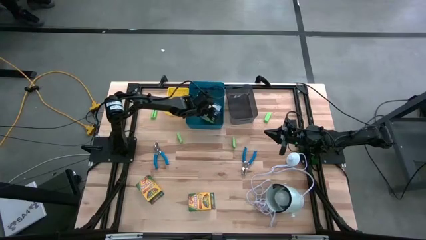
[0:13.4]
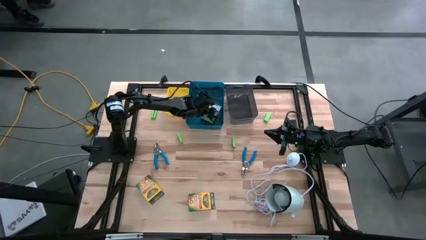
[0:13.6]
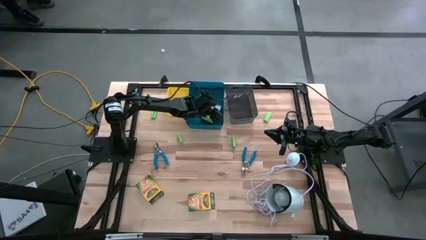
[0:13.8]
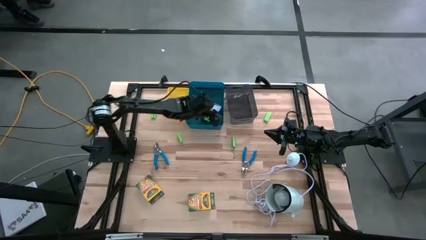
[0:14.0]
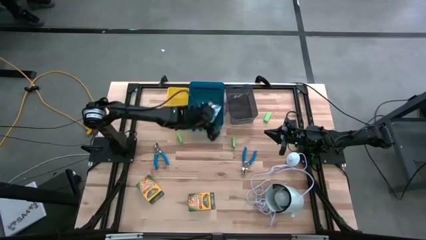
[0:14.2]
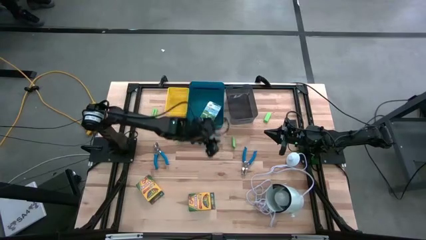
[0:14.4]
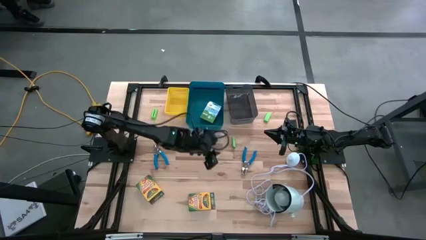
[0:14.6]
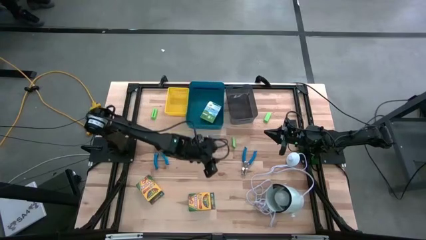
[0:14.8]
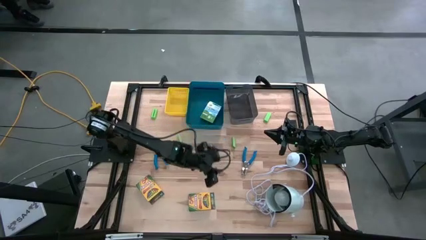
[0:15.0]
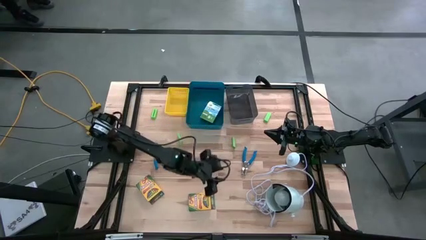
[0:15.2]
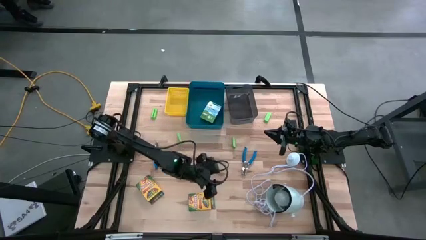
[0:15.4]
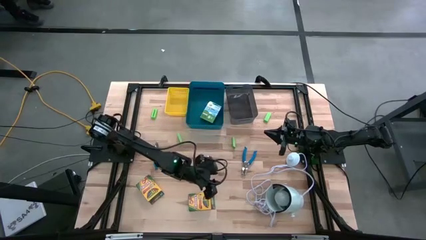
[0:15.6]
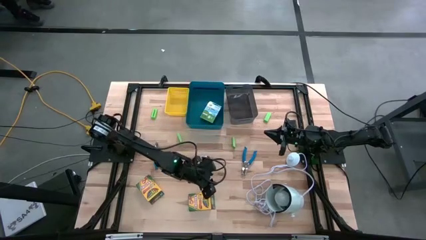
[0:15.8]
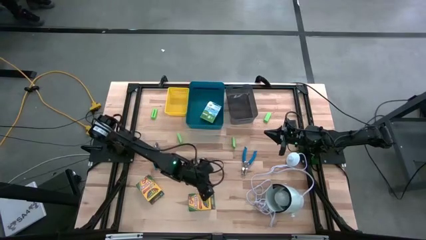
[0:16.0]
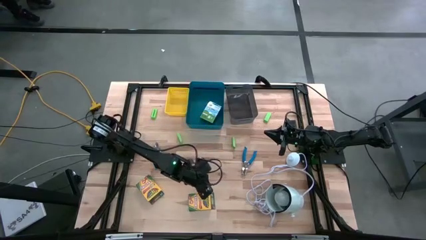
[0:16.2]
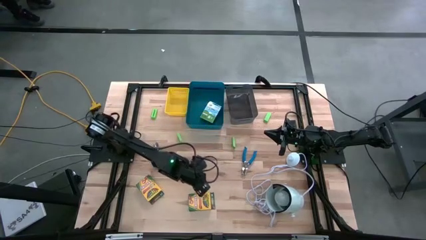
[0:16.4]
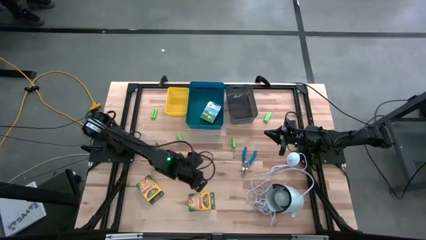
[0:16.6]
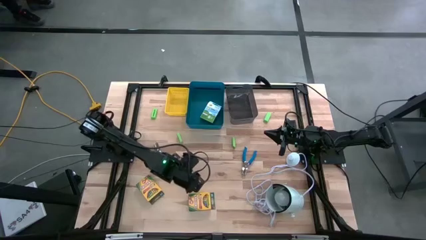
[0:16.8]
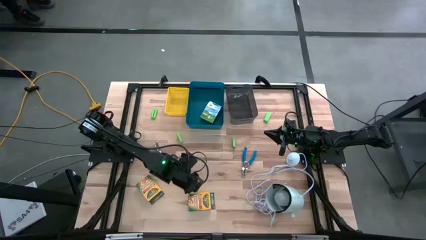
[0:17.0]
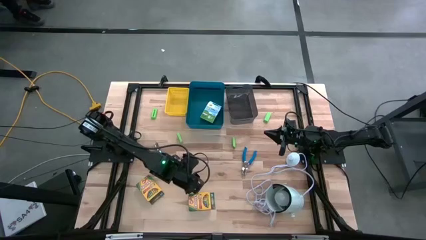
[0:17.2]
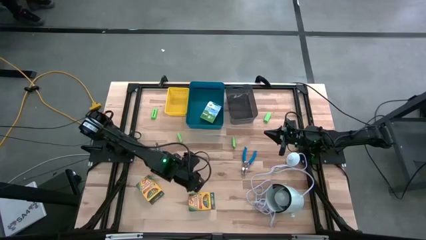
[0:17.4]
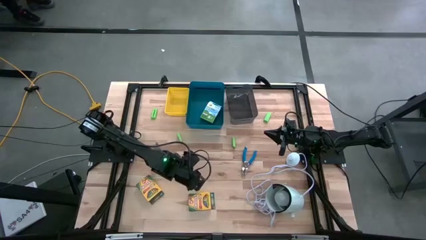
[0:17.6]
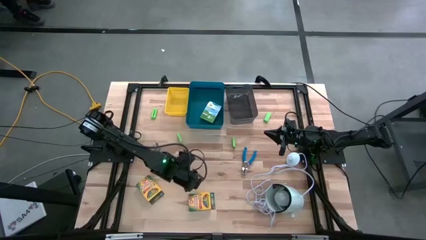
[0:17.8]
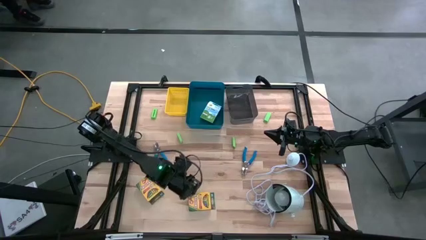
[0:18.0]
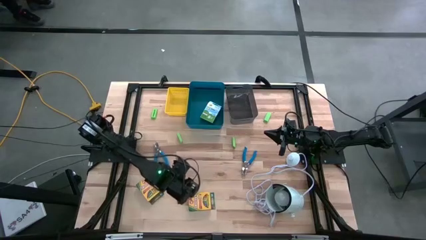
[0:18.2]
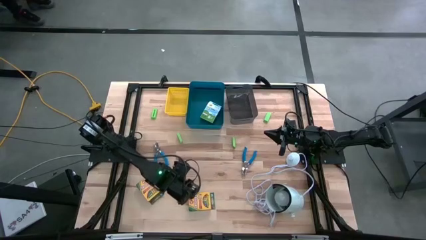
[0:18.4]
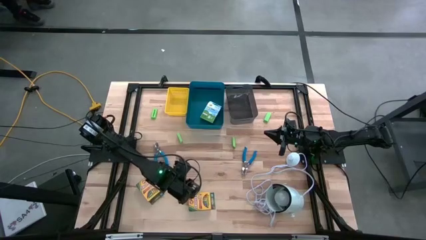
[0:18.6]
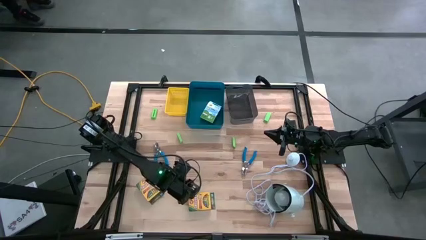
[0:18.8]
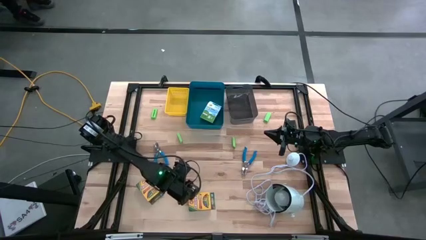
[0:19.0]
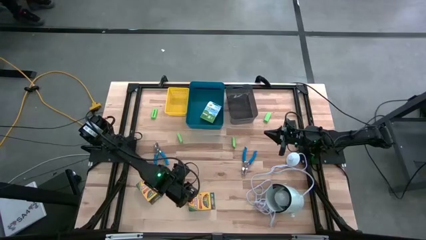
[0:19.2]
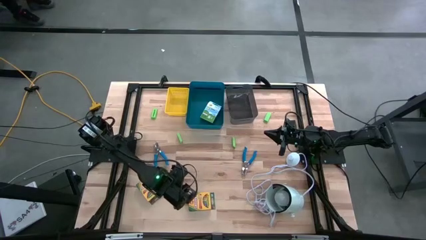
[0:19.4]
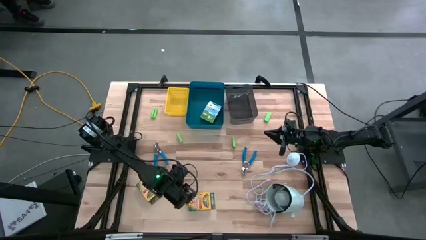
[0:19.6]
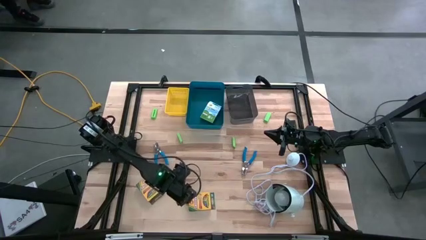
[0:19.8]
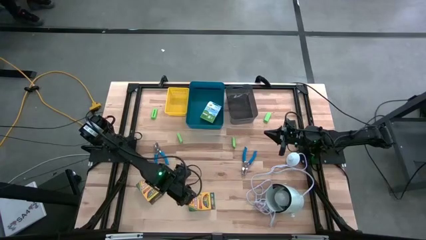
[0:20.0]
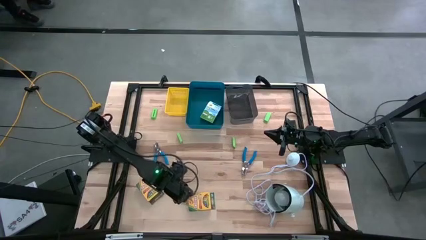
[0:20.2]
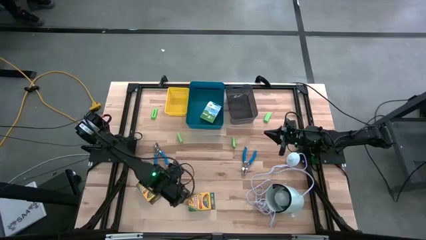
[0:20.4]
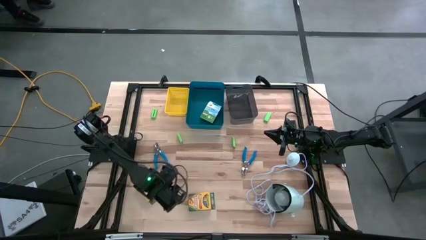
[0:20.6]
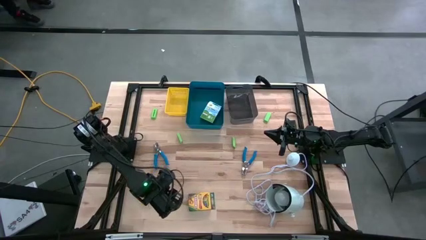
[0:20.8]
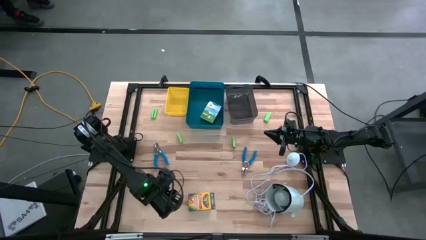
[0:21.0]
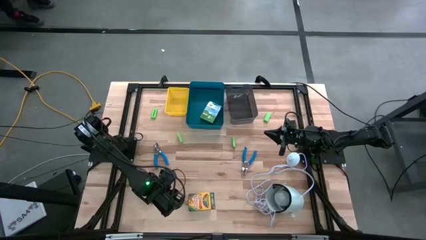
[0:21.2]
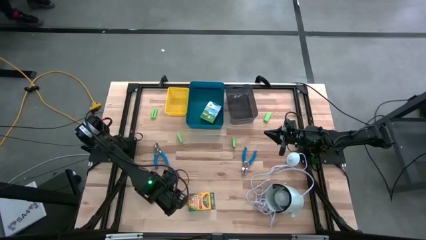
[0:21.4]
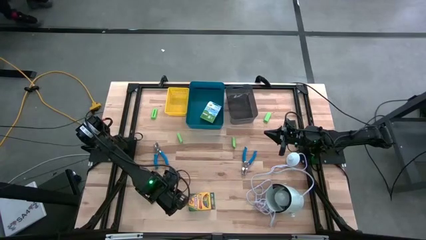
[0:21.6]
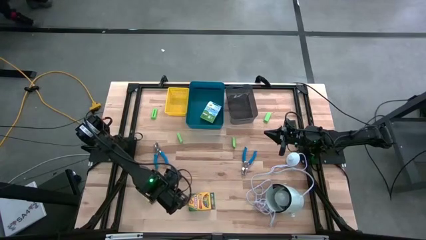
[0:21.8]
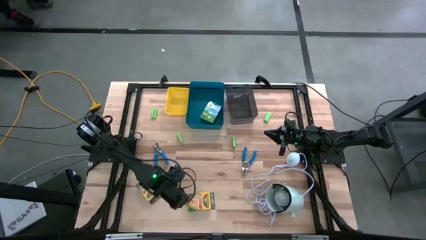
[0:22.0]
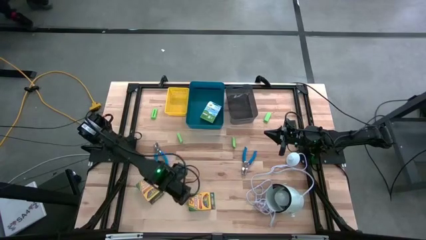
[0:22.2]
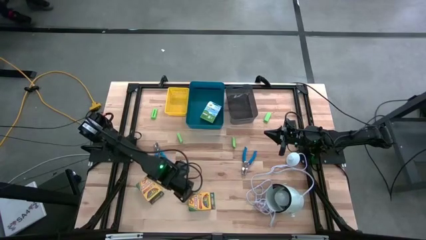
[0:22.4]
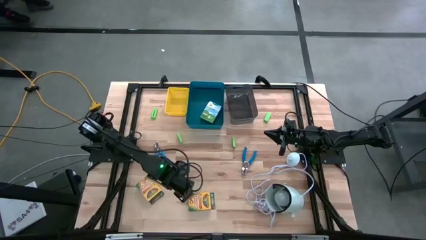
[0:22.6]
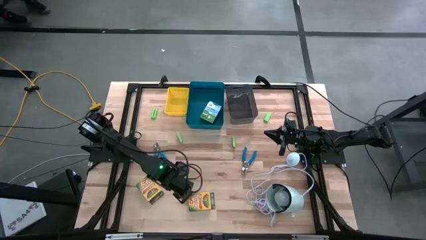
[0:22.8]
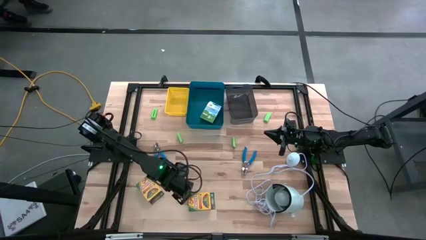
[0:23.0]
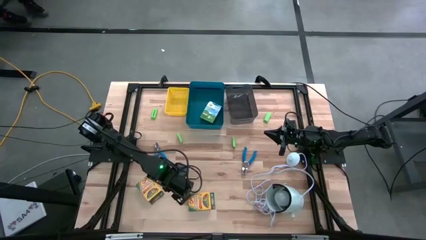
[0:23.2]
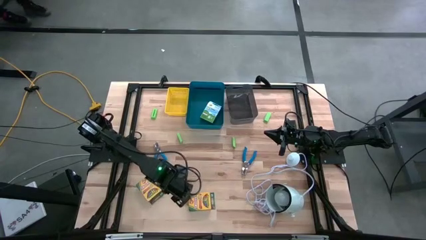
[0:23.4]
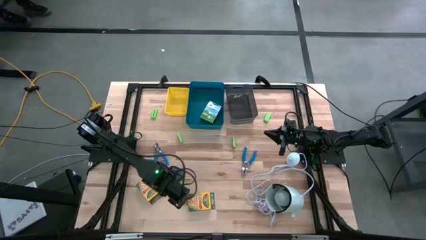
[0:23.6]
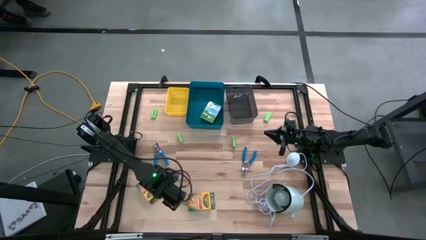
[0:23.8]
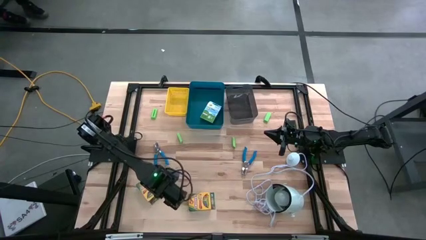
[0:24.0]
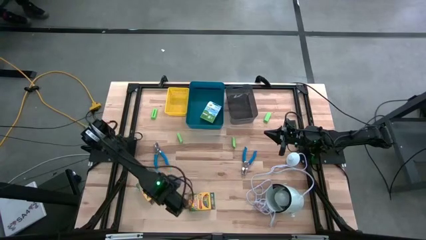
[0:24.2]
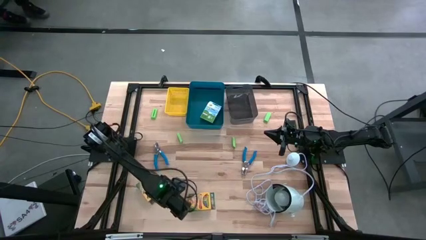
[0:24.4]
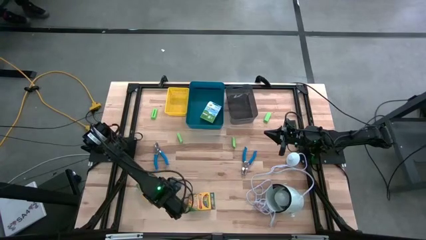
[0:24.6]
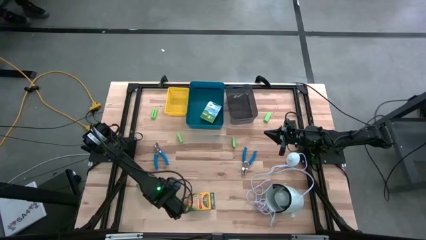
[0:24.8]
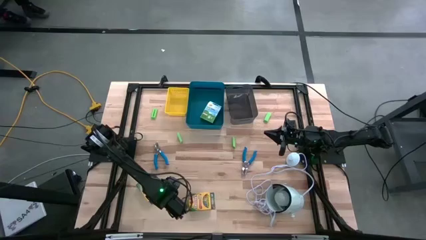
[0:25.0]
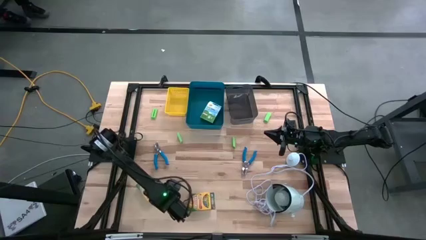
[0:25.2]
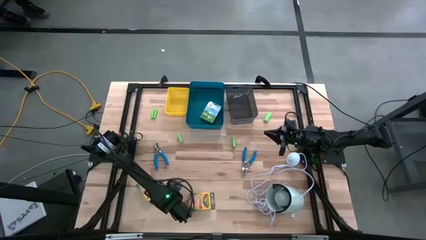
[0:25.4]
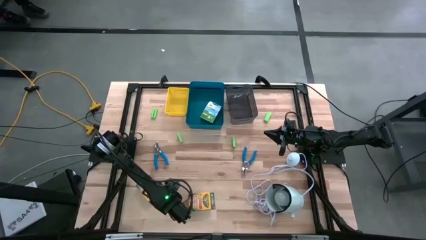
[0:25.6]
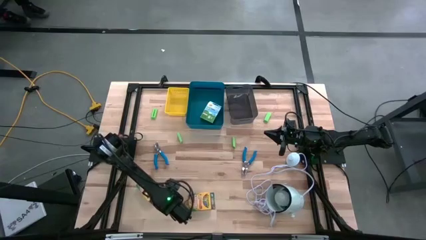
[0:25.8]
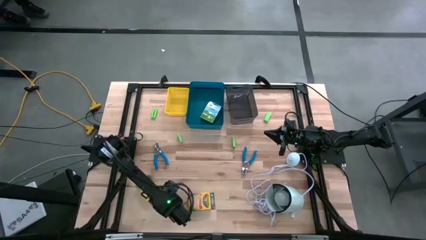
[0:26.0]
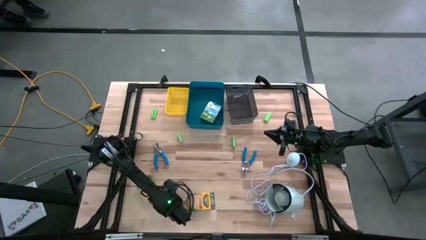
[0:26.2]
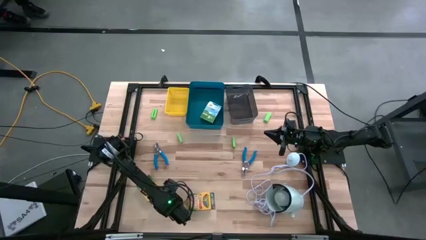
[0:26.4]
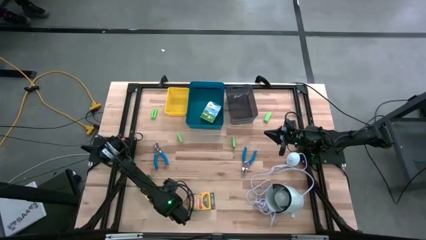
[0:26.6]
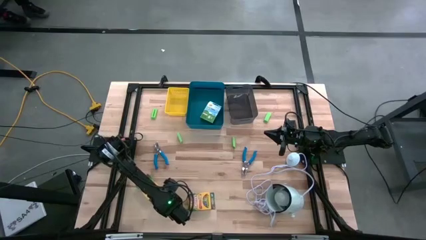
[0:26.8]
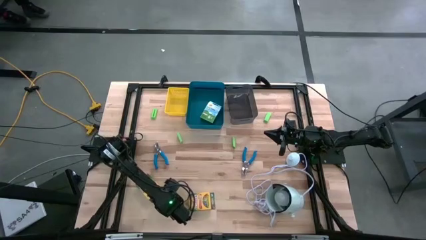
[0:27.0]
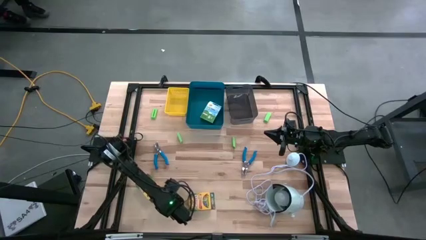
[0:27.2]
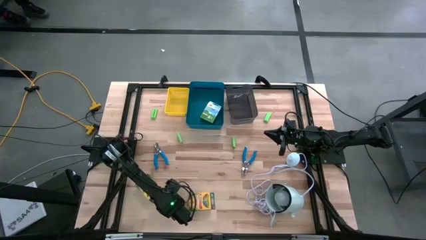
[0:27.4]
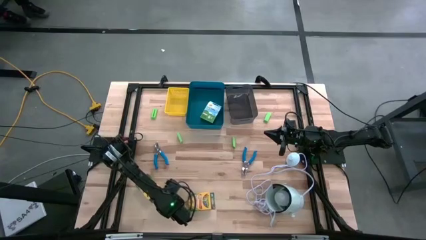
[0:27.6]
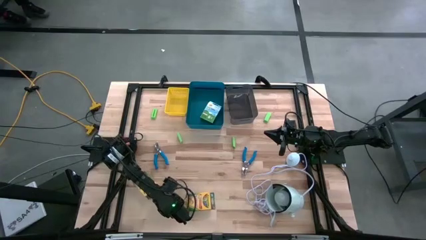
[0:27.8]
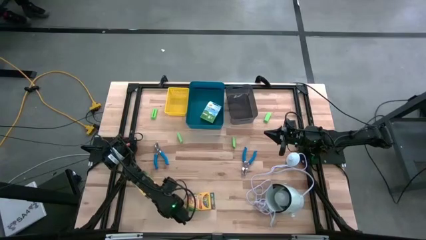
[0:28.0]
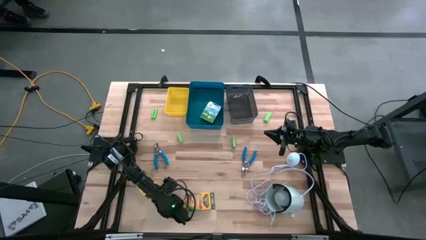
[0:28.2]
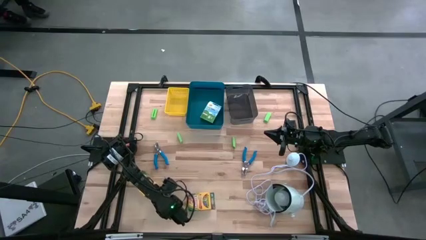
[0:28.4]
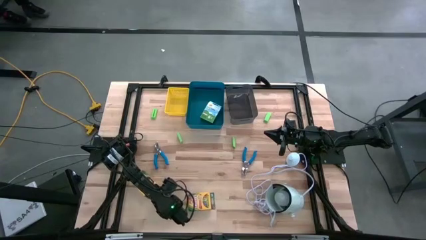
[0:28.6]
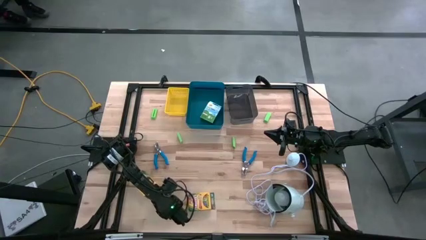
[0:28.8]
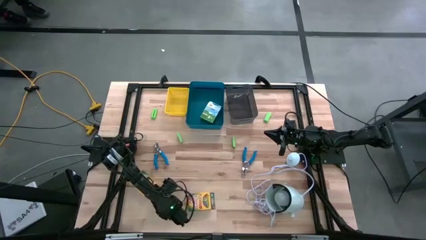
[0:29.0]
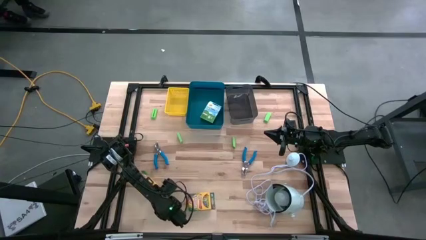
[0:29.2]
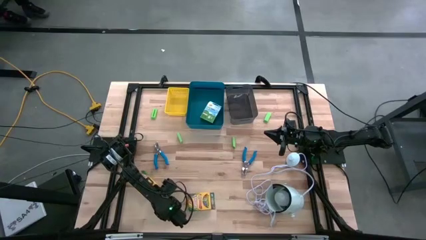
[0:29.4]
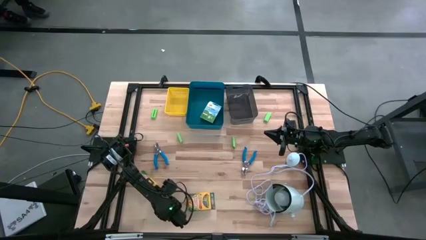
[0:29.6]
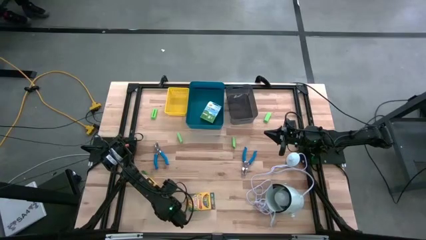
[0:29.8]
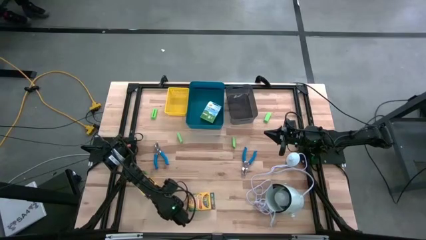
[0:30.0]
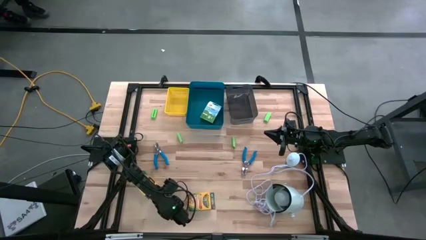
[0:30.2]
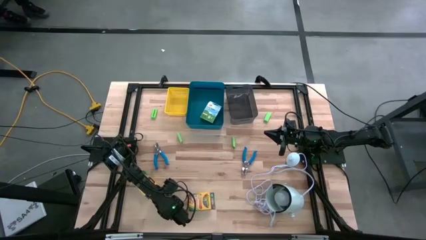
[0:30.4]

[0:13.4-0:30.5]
Task: Pick & Place School Supplies
Put the crayon box into the blue bin
